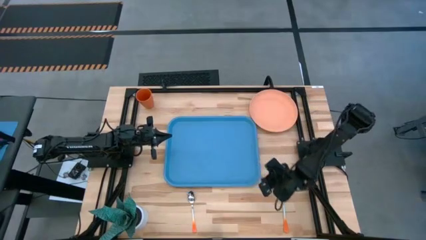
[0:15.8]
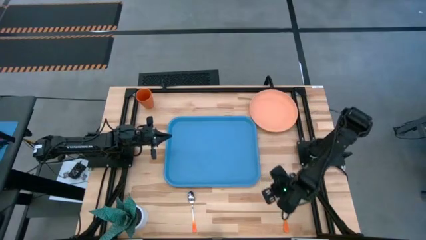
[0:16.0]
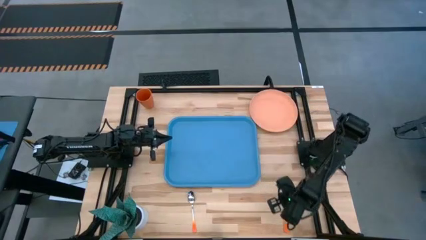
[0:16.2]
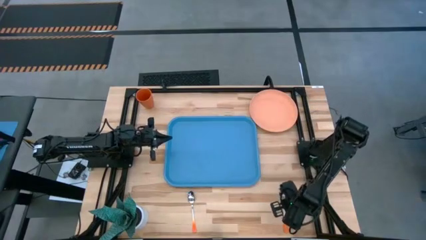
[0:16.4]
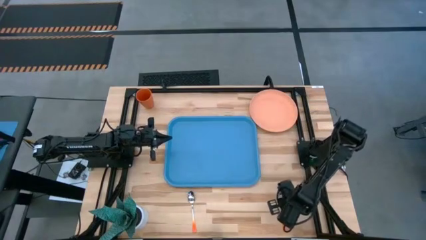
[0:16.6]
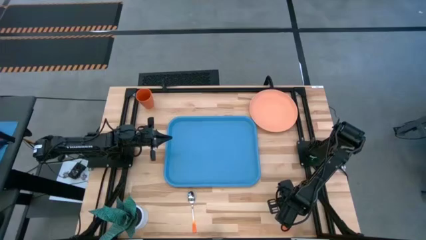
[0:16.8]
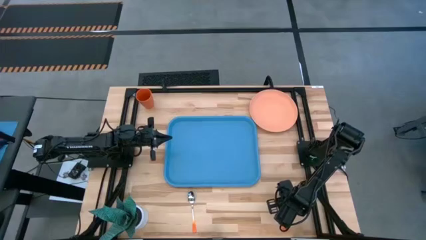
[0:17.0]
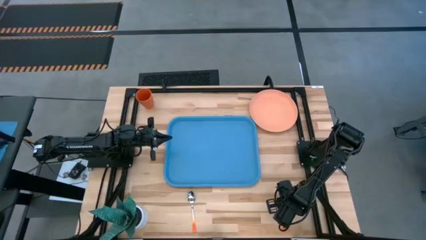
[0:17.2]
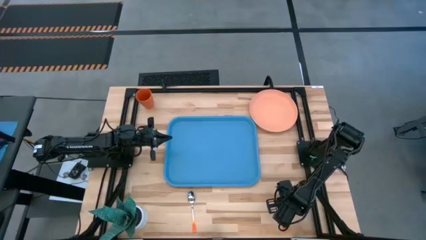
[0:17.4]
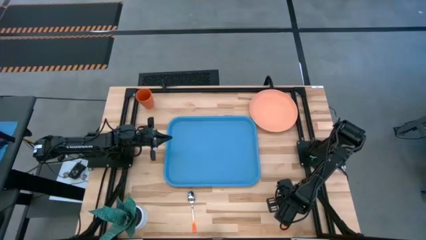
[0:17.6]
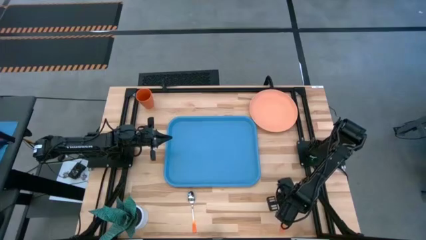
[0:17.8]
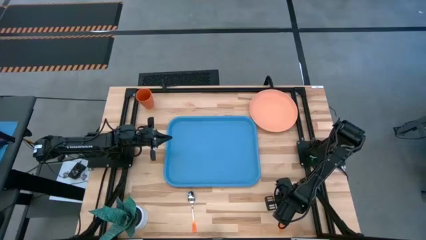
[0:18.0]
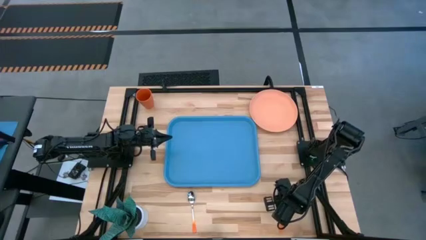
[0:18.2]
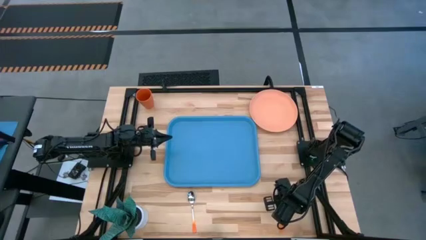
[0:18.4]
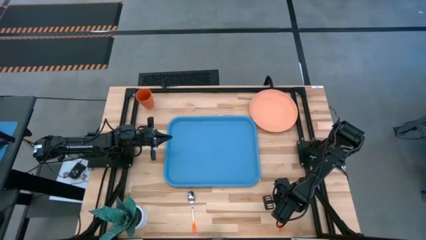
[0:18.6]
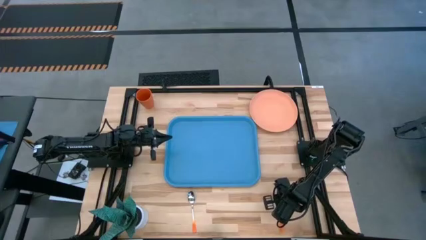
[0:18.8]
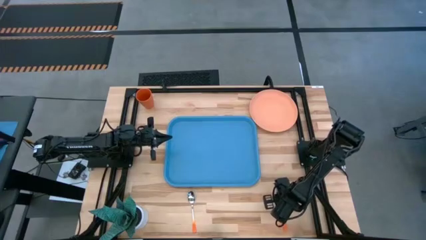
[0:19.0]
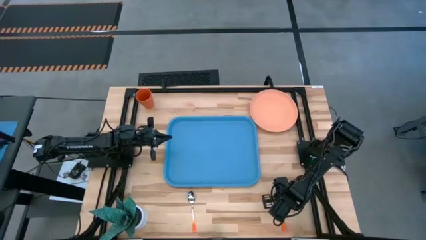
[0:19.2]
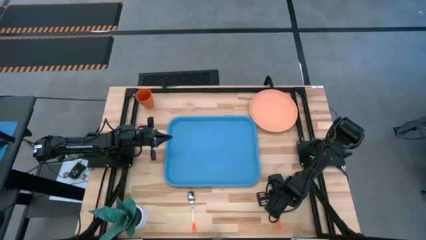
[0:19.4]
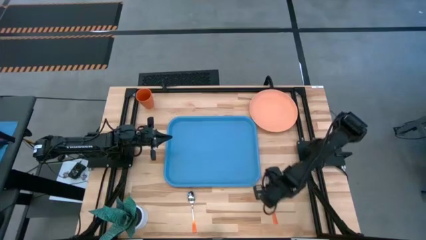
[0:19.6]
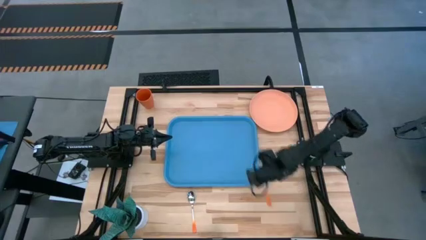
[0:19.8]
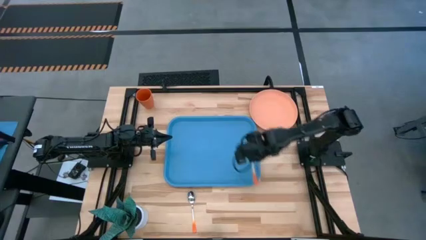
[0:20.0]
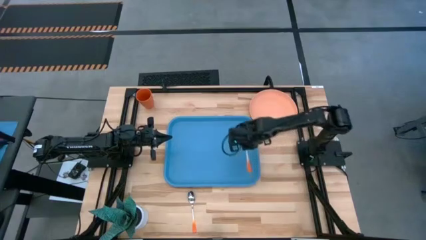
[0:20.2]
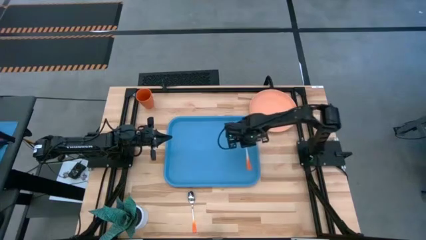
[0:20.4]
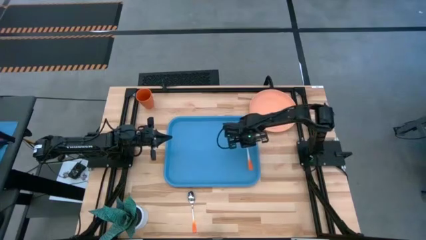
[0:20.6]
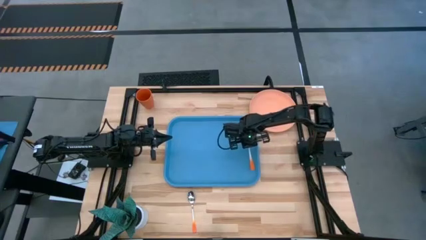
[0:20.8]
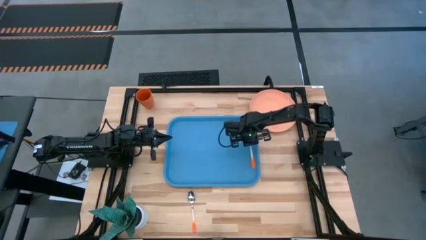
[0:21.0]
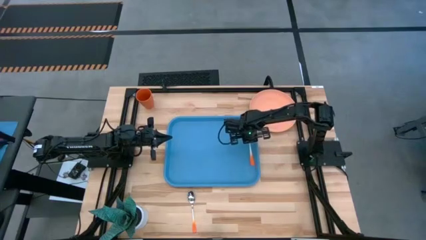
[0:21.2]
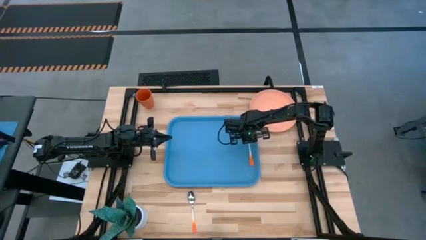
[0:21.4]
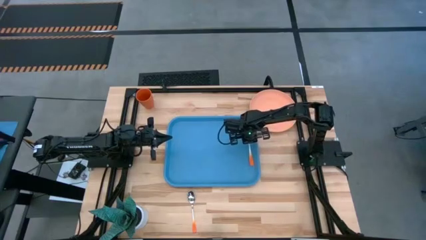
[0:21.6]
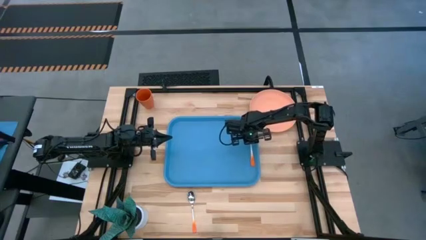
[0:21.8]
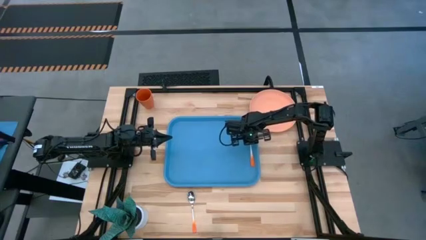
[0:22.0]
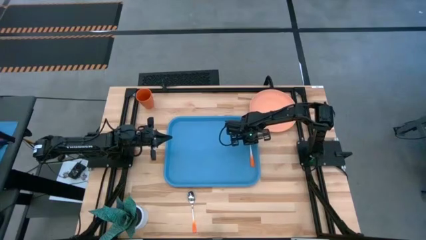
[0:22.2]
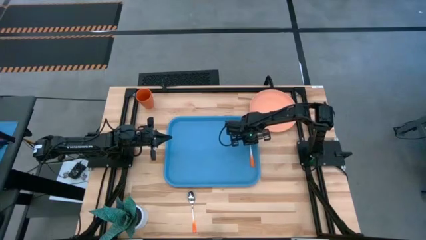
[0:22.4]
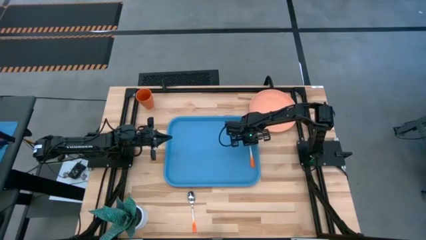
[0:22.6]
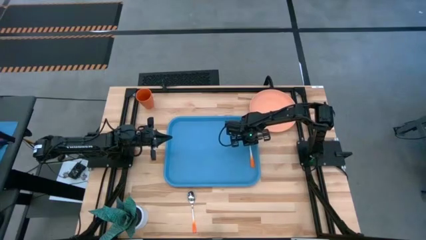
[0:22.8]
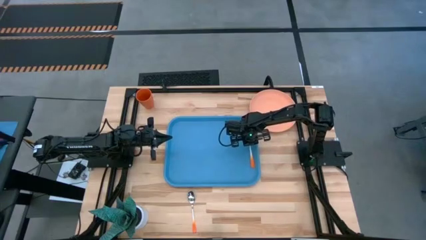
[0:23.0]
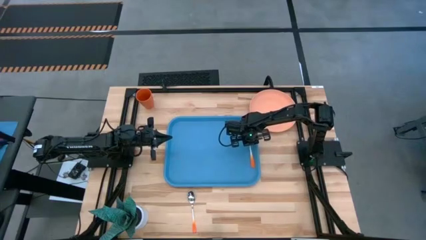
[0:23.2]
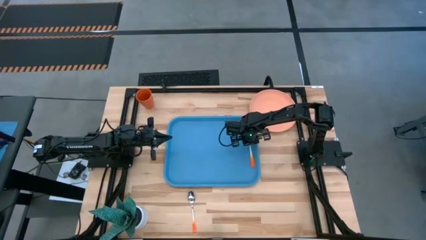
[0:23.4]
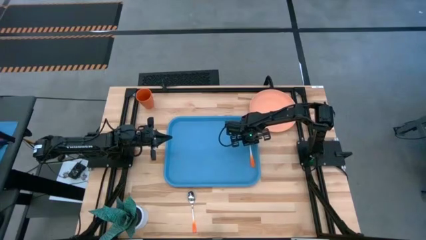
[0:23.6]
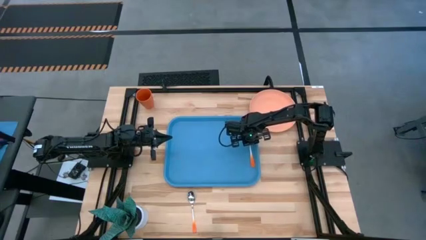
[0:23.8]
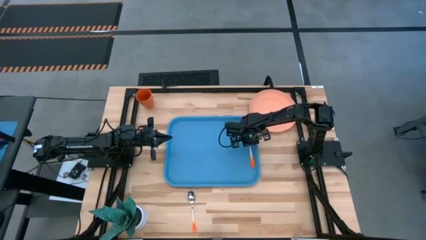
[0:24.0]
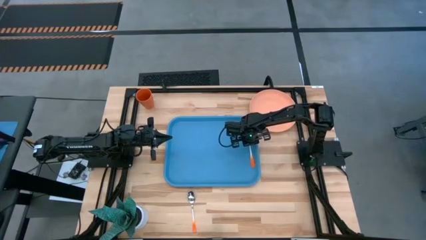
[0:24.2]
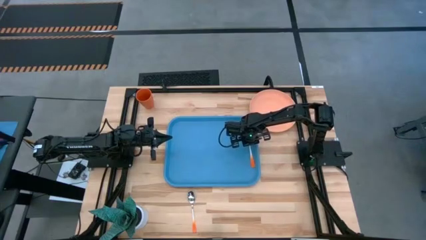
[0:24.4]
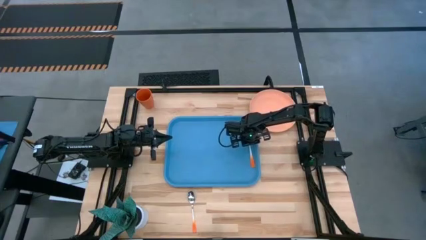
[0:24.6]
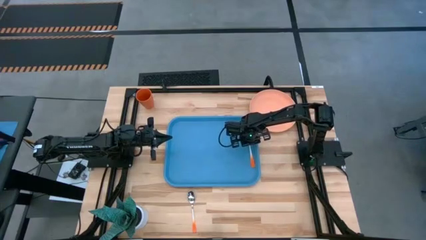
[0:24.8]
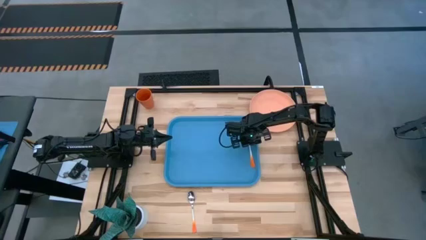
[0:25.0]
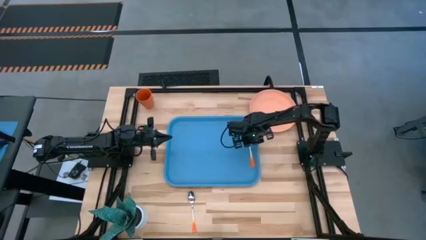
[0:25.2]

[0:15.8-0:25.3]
Task: Pick and place plate/cup/fork/spoon on tray
Put the orange fork on the blue serving tray

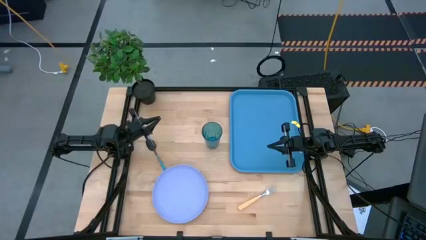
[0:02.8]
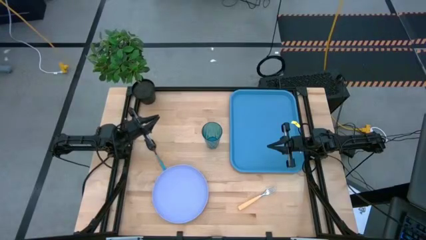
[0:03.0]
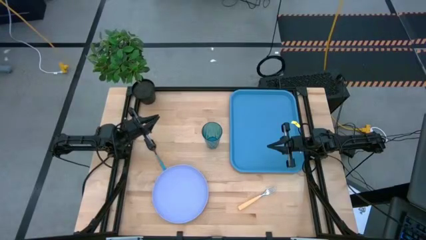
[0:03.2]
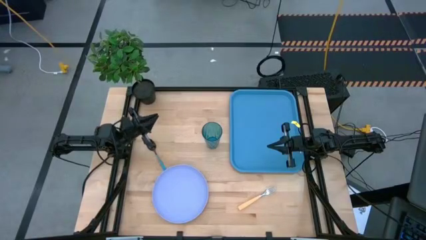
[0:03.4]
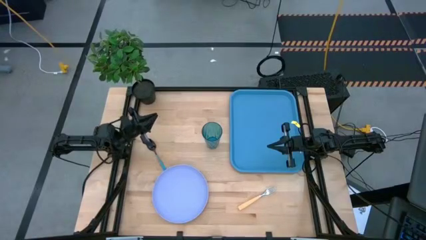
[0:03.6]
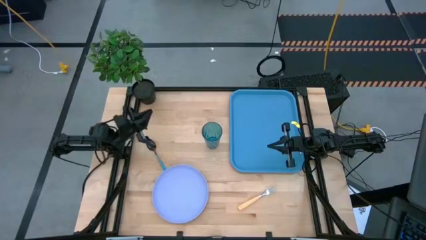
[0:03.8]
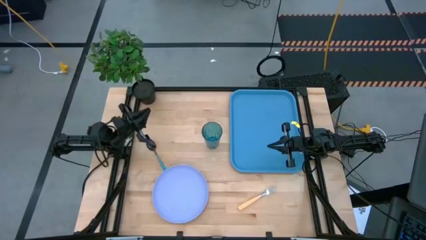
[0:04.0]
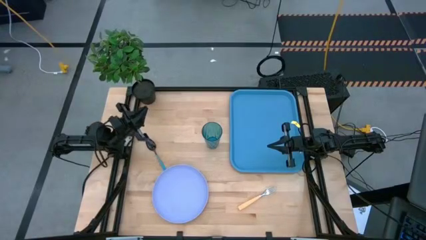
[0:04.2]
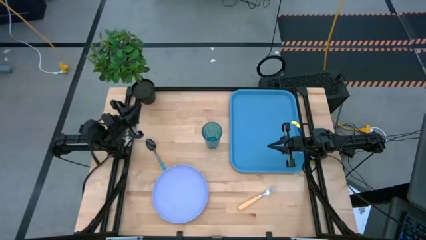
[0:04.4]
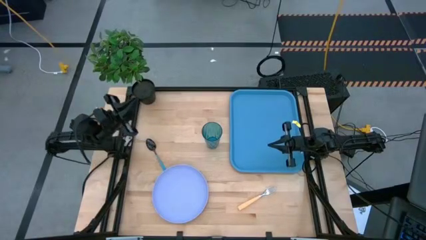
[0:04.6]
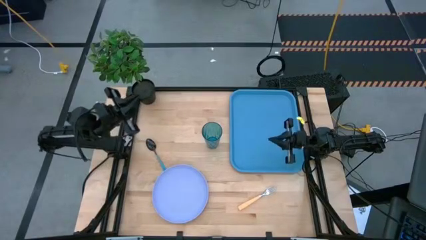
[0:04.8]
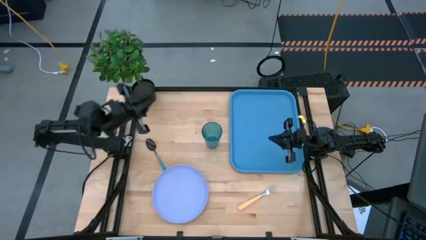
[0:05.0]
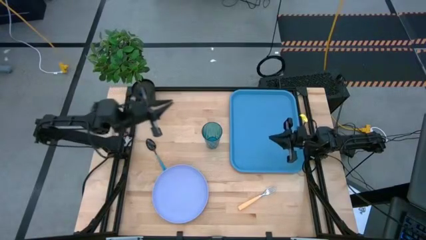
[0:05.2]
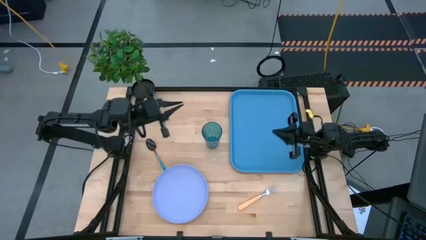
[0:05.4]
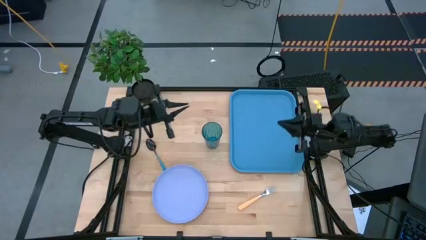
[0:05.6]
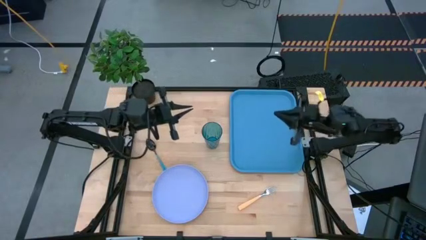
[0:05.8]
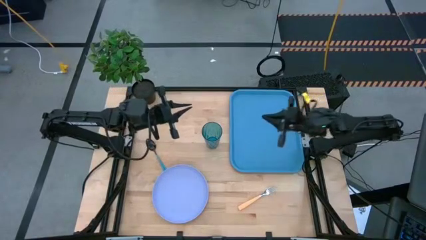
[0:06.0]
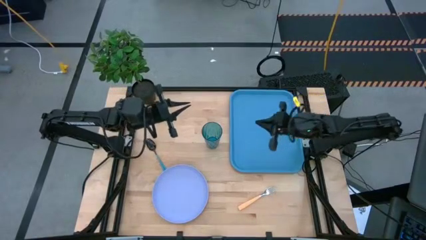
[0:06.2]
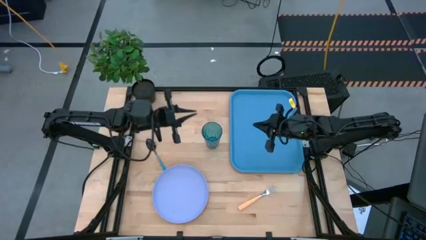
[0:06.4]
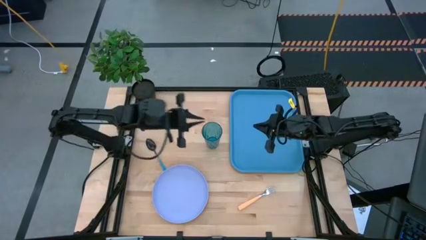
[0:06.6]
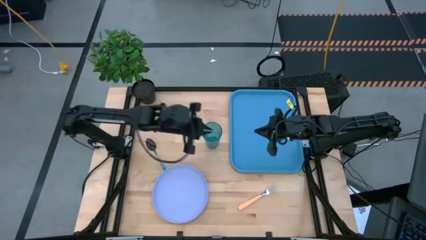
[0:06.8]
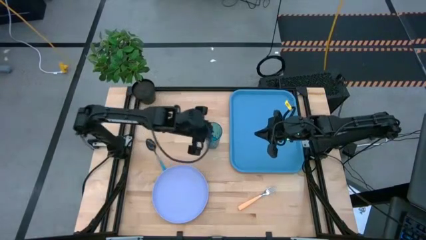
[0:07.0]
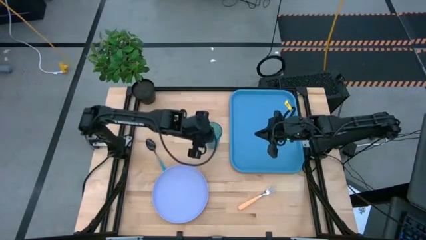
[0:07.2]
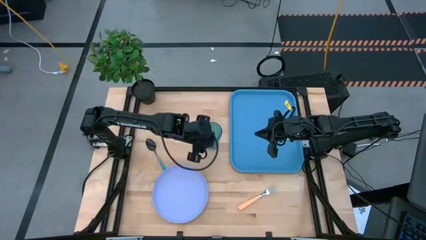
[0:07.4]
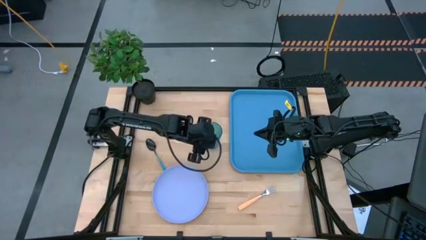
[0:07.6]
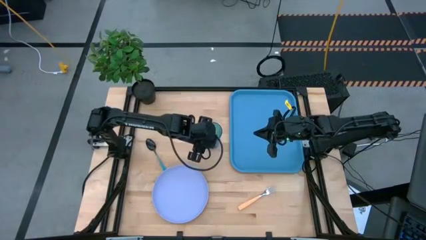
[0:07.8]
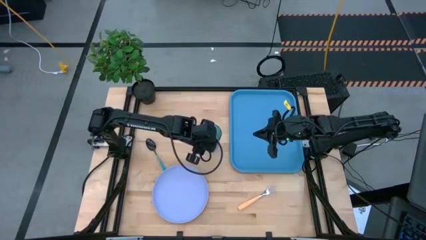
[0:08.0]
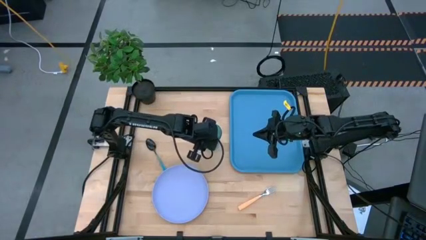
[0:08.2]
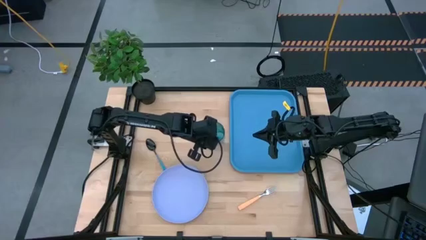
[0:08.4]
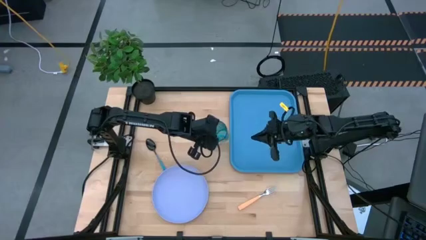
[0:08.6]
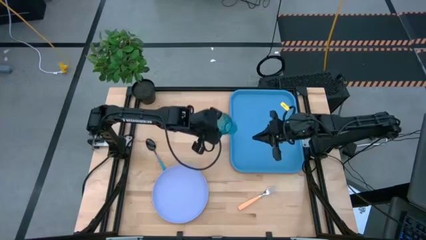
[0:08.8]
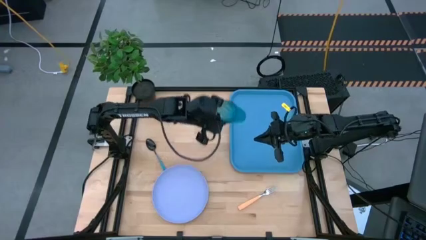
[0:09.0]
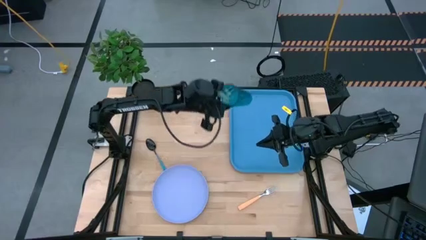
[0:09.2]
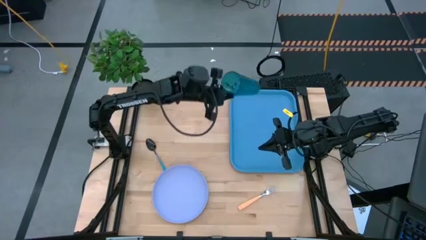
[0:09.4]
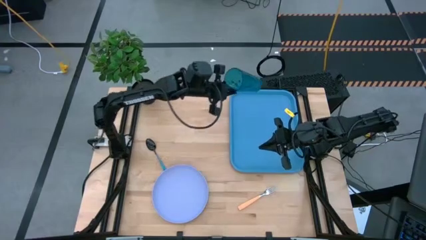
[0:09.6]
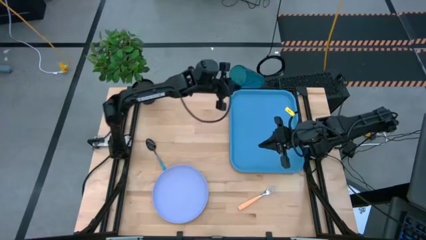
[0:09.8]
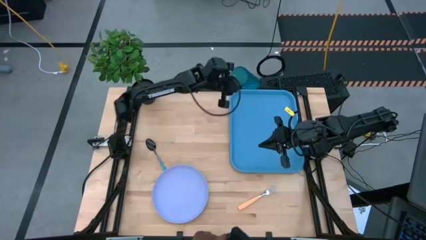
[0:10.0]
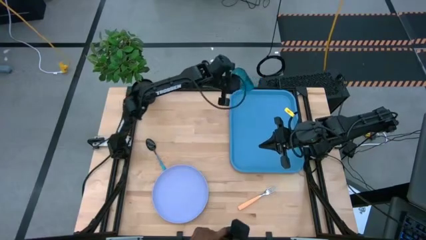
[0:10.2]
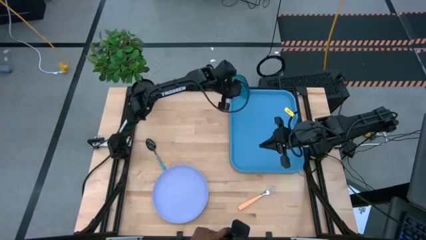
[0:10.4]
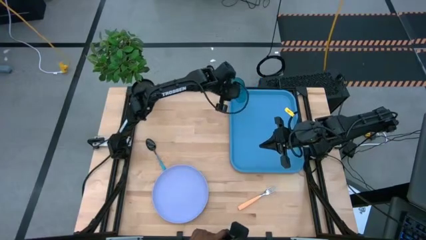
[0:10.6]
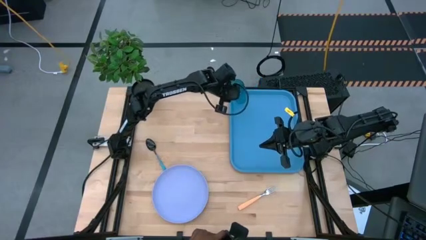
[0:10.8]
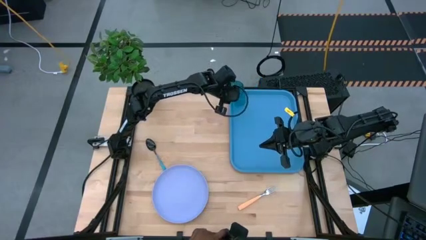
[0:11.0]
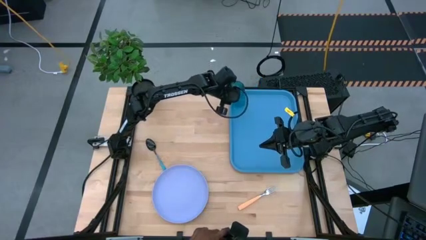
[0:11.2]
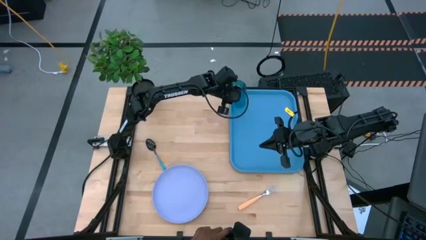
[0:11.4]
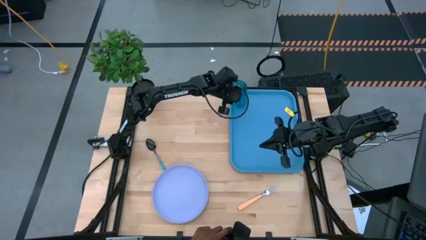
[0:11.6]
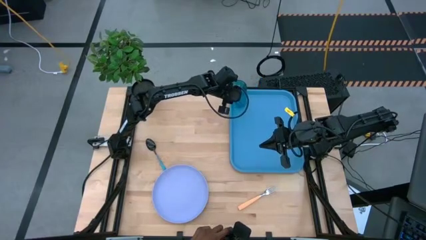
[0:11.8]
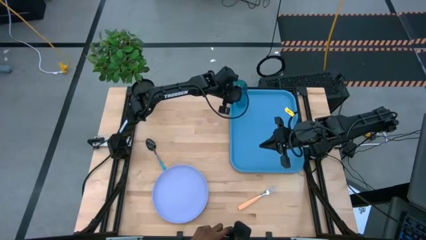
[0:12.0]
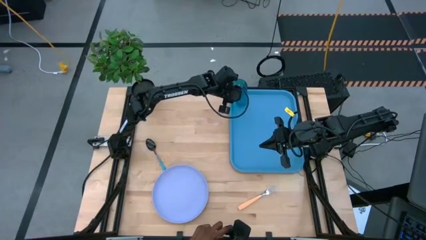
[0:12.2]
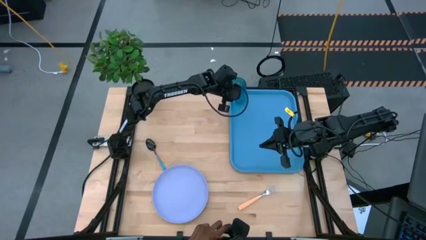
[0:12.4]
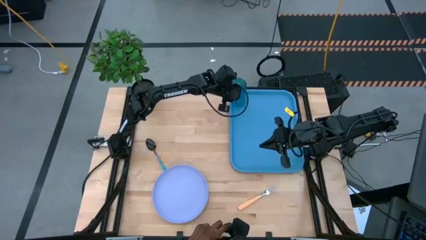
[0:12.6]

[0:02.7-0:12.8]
Task: Pick and place plate/cup/fork/spoon on tray
Put the blue transparent cup in the blue table tray
